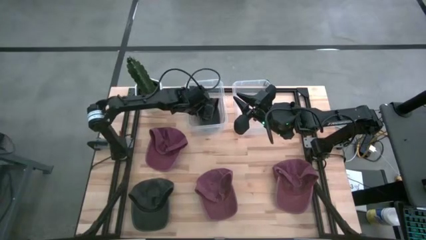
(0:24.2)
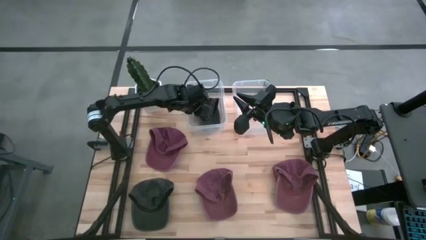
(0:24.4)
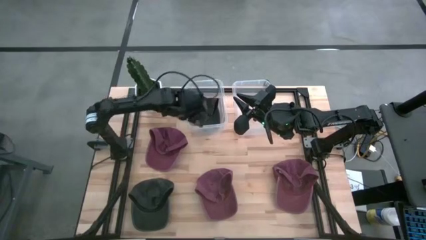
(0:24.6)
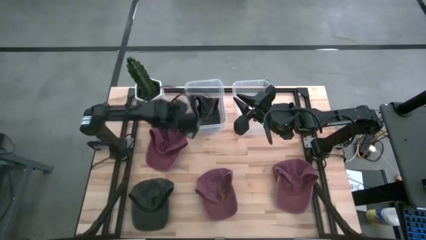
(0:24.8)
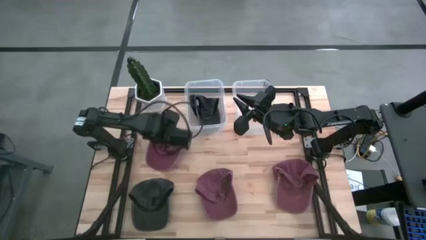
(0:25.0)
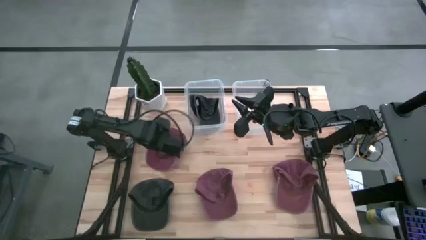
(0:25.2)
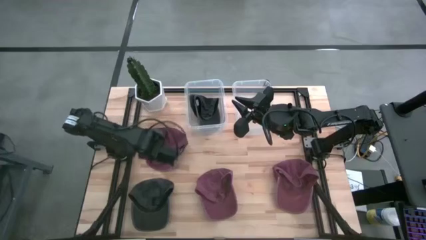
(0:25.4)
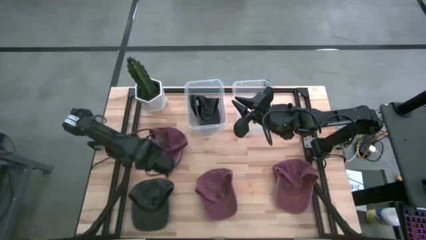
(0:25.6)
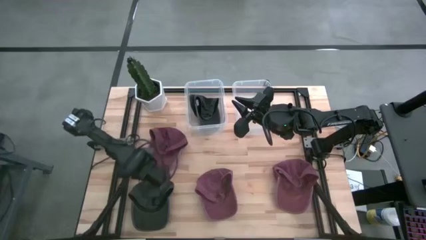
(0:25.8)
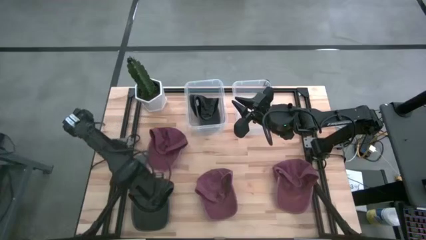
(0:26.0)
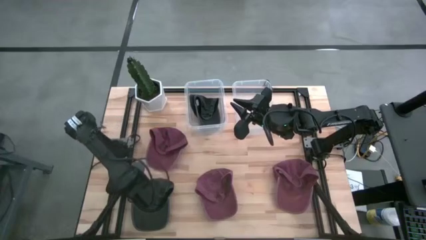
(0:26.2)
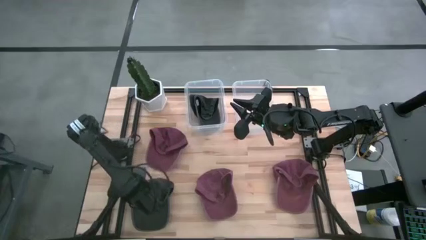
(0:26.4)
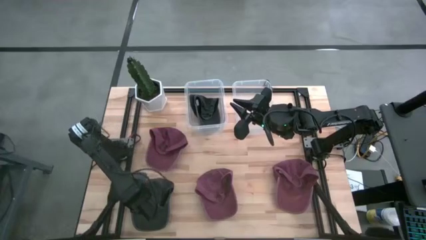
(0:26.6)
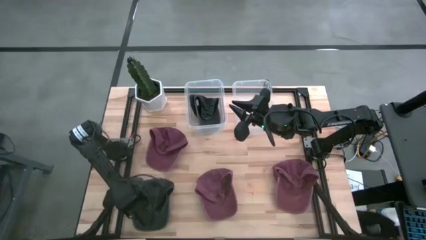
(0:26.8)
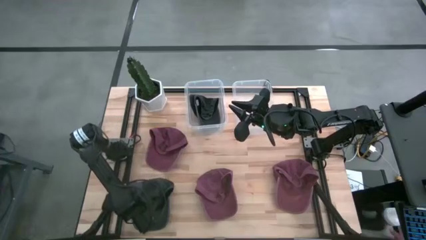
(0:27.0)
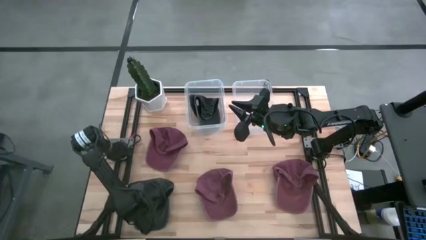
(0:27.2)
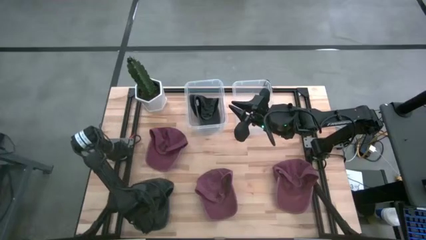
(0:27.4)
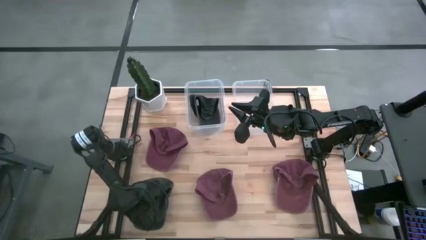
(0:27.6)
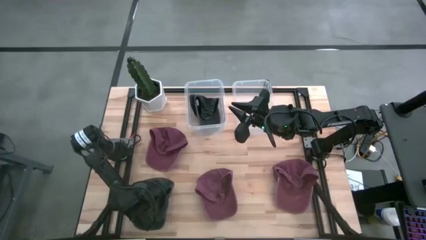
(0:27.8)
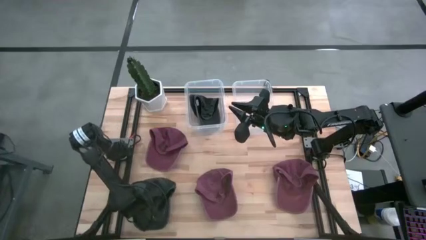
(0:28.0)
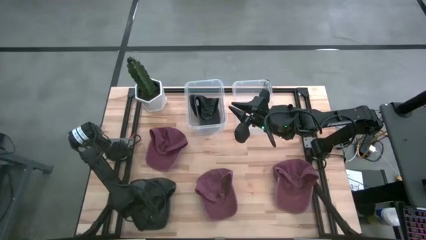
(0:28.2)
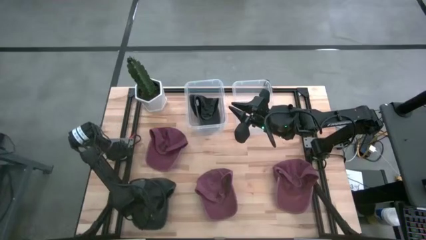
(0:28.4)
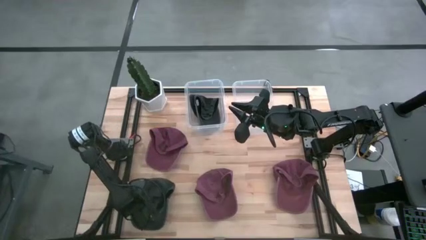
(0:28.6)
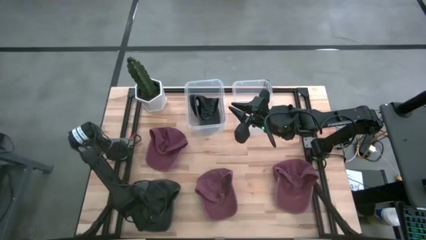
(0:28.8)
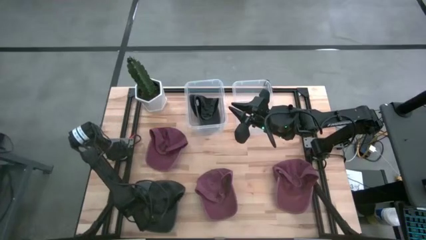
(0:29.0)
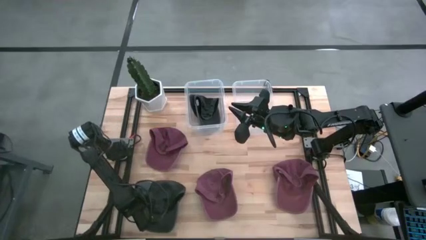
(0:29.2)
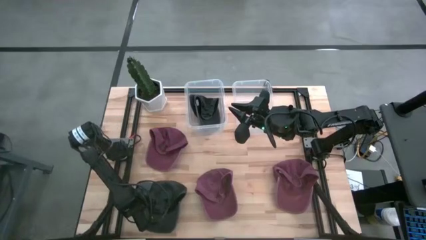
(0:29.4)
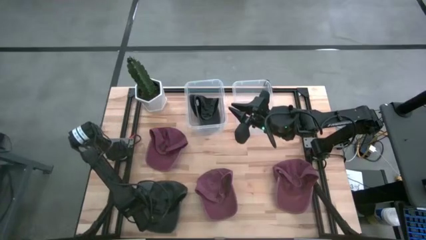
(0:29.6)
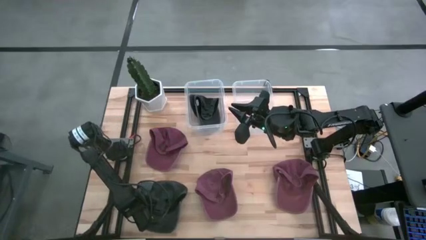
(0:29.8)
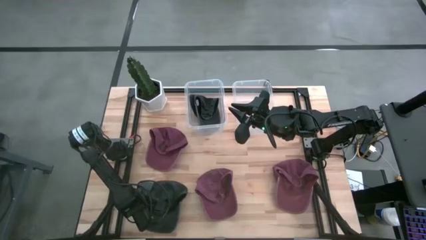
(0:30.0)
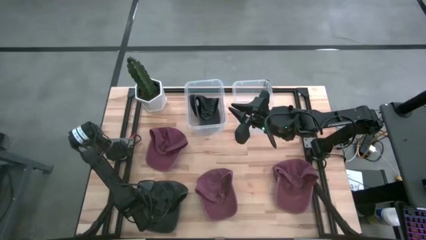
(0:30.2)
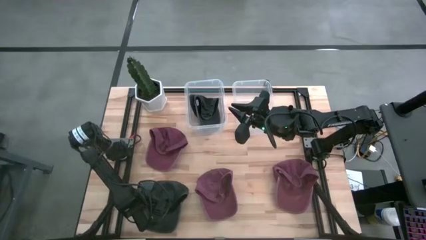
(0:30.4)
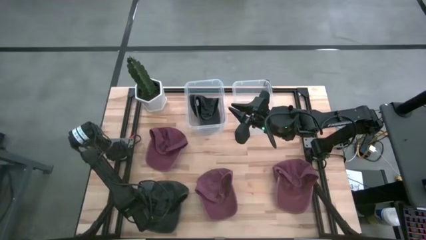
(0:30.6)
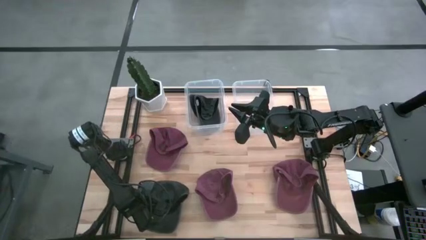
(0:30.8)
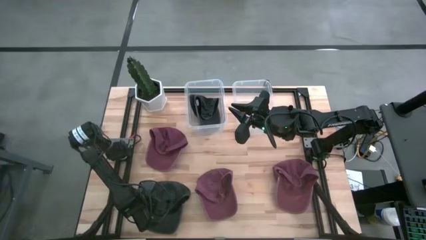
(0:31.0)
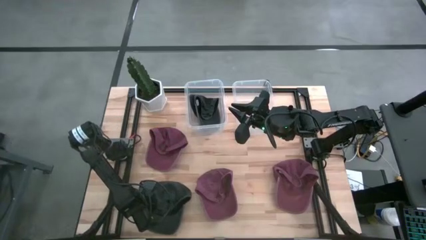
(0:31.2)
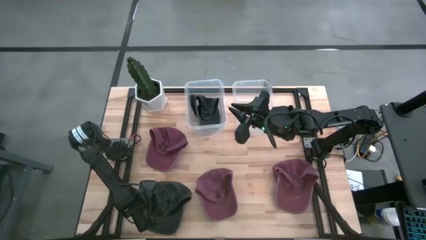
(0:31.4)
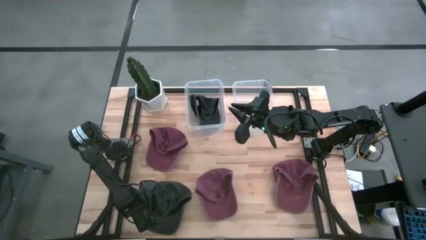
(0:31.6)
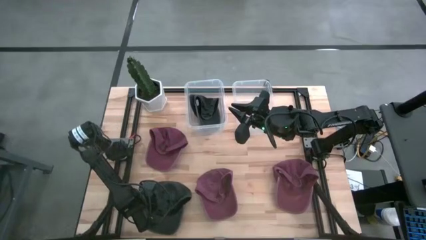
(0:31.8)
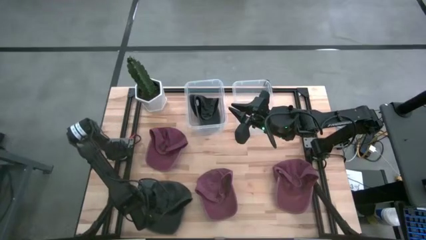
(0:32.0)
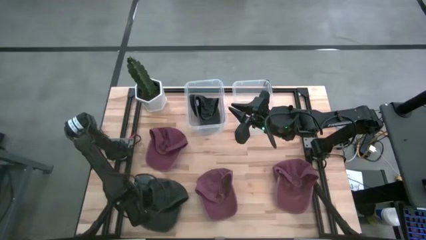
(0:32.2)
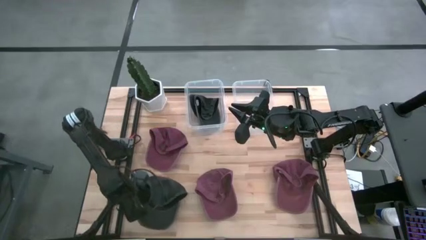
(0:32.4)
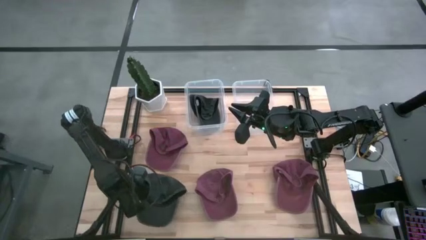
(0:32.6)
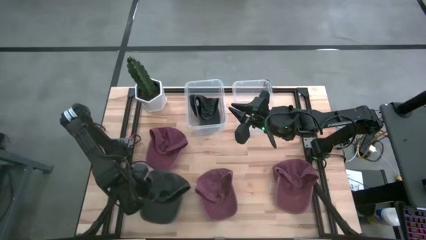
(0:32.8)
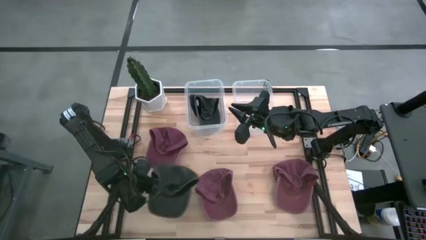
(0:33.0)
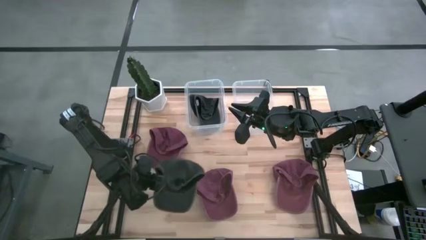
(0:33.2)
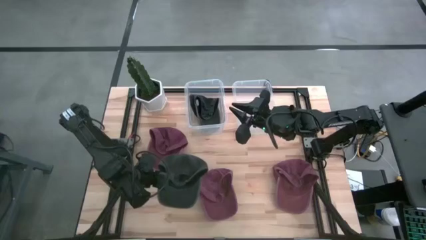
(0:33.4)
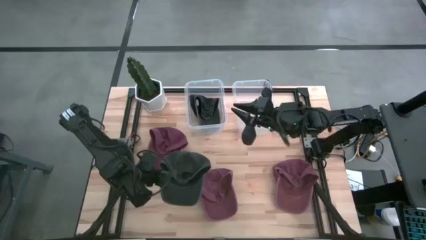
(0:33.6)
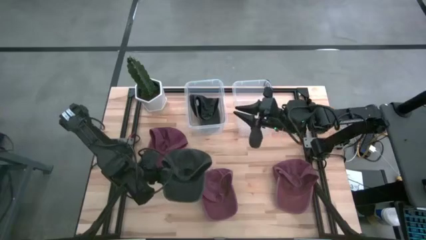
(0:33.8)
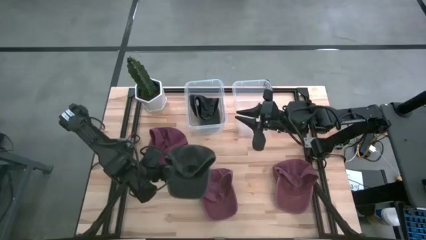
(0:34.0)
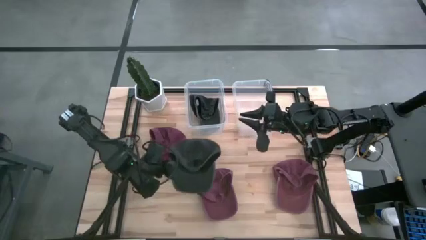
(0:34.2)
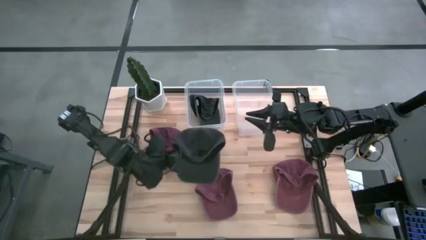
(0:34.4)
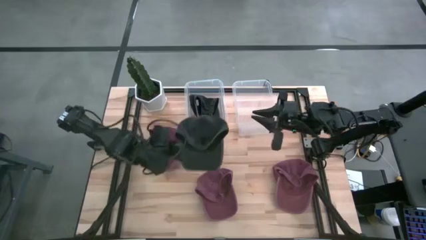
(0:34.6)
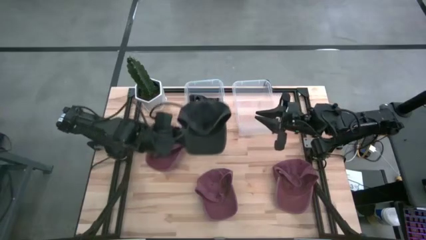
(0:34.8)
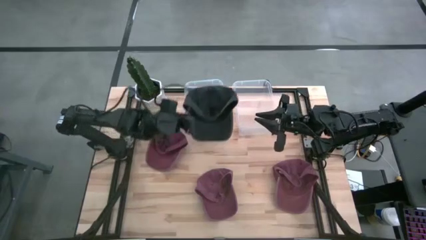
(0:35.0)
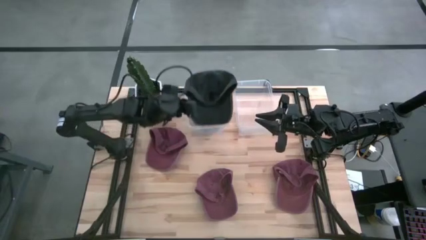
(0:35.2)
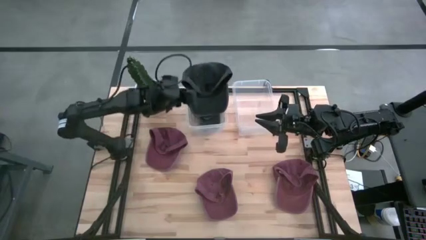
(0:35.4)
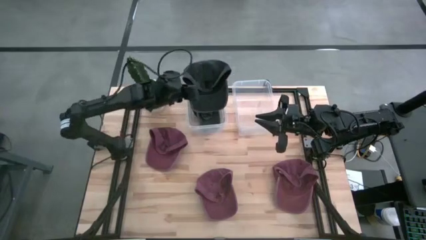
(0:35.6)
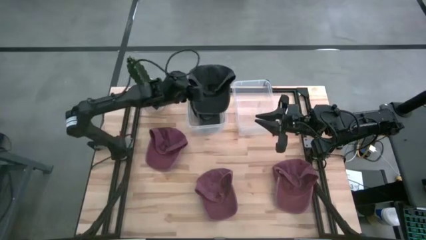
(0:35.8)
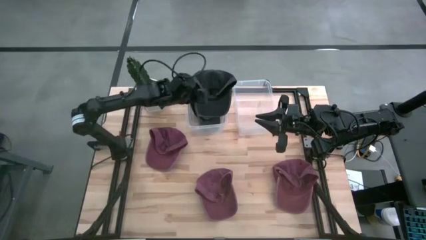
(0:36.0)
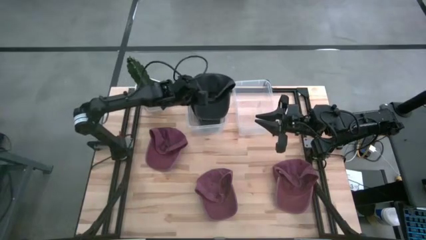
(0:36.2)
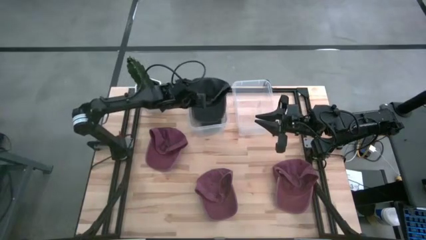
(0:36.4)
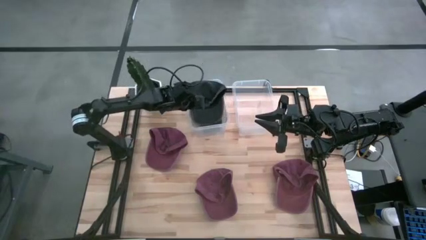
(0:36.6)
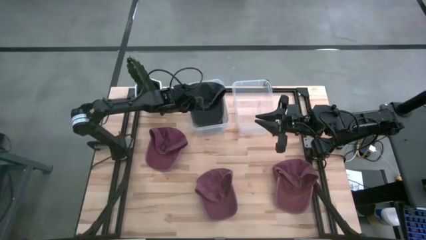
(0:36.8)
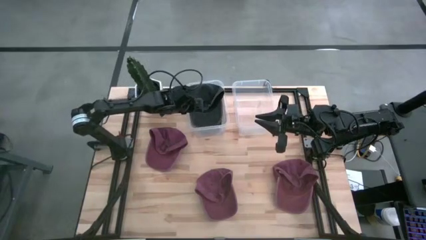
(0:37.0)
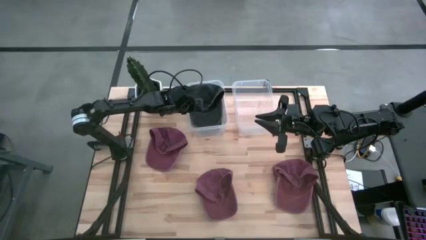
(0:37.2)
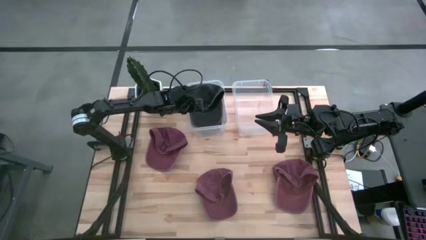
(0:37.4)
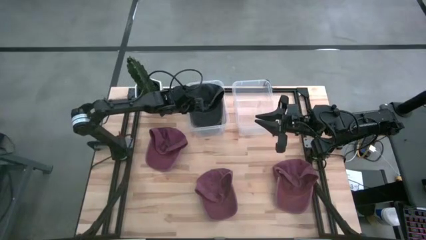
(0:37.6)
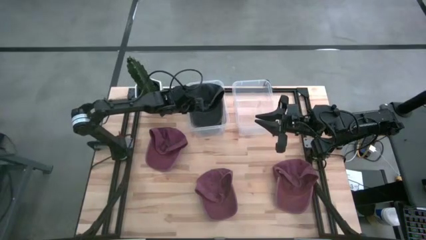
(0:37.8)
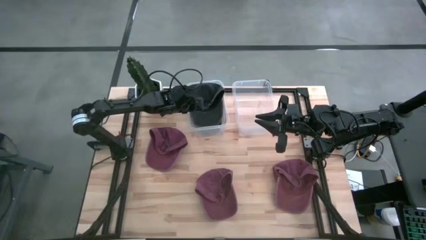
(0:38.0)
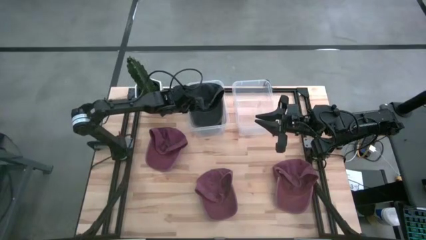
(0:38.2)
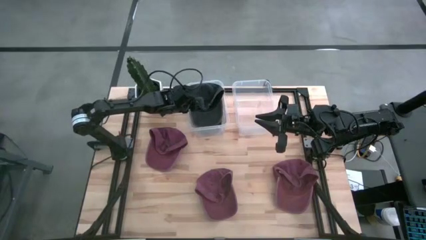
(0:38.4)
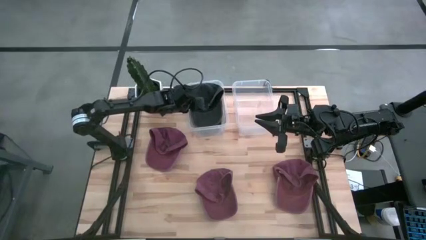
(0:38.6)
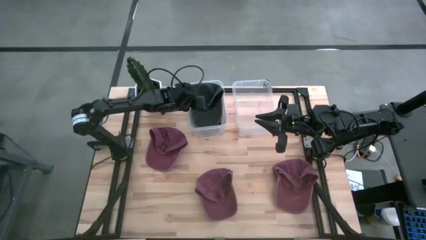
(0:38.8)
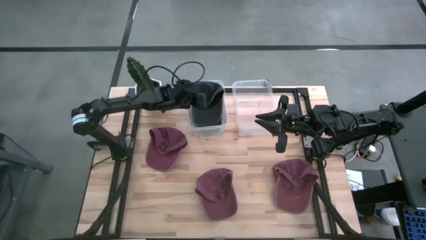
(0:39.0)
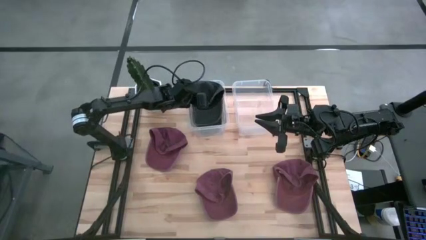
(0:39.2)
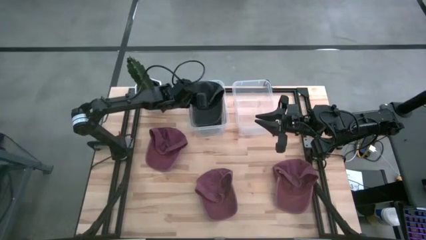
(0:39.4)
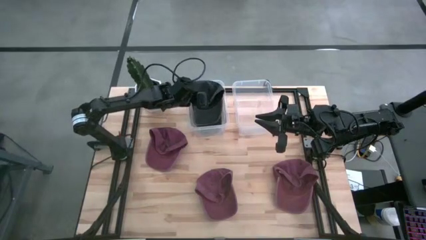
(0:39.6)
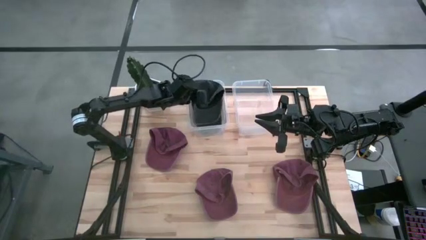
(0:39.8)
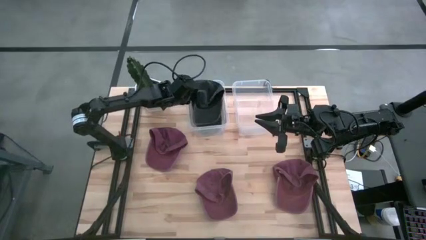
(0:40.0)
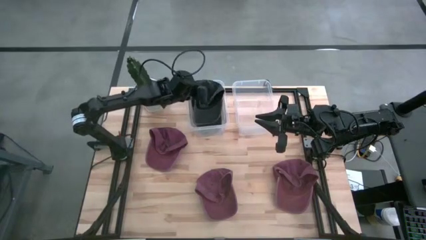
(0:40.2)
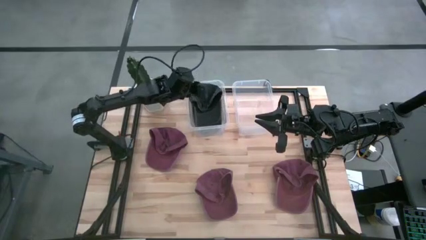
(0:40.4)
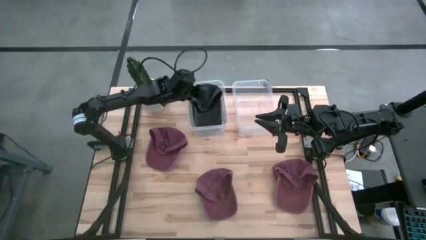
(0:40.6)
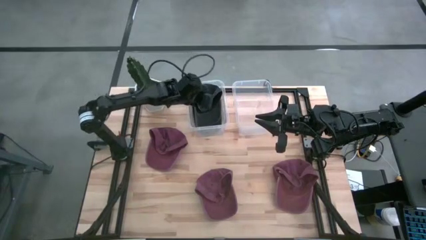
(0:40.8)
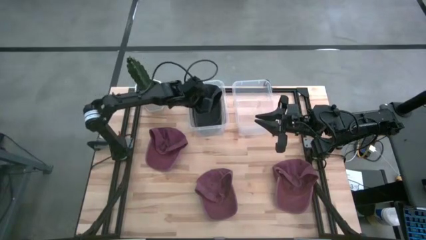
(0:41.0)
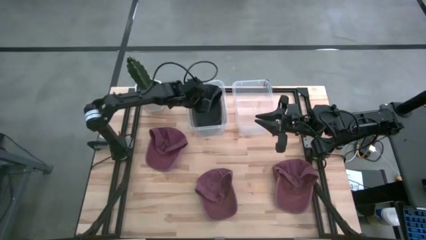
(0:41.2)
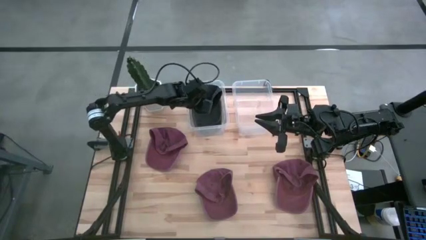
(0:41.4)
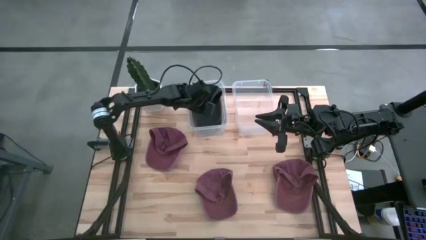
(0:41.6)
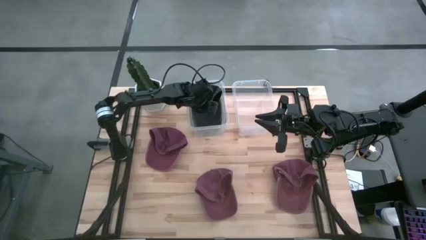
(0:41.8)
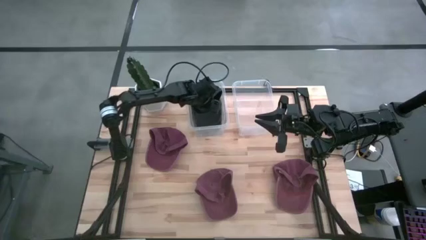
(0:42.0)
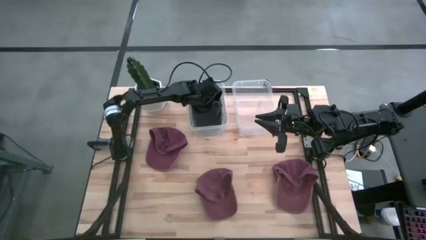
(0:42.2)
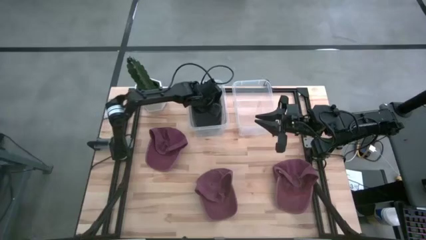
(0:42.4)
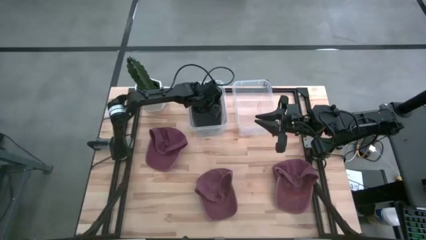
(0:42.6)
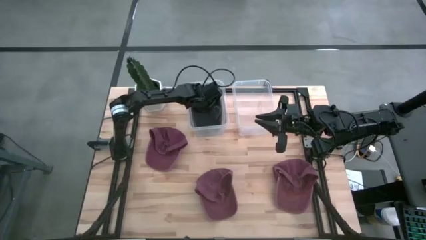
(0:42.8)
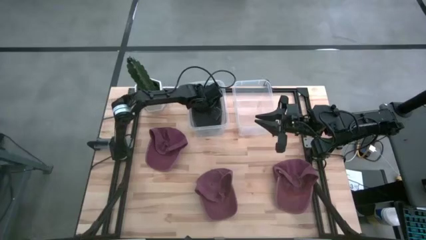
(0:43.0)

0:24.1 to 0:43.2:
Task: Pick & Place hat
Put the gray cap into the left transparent bin
